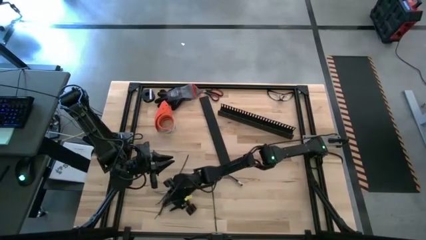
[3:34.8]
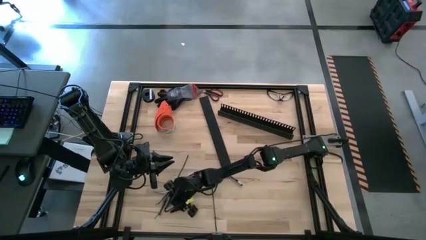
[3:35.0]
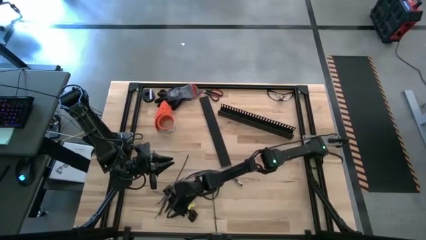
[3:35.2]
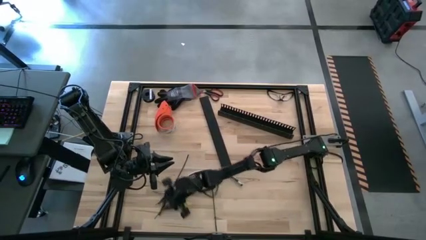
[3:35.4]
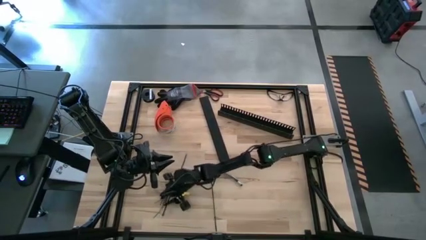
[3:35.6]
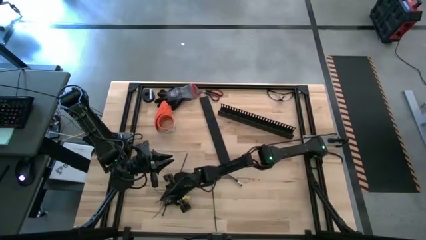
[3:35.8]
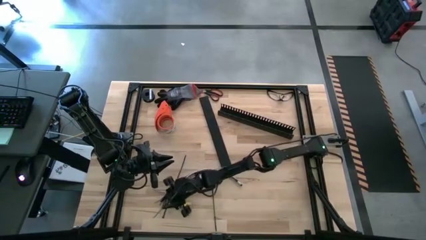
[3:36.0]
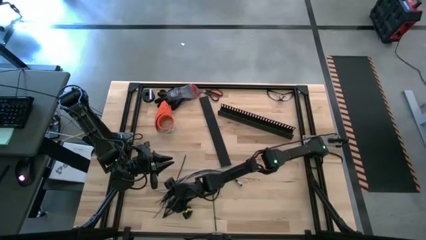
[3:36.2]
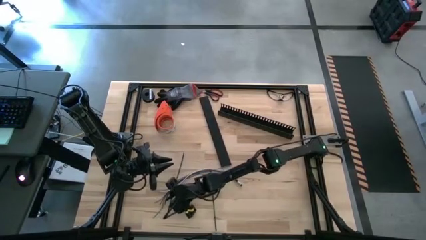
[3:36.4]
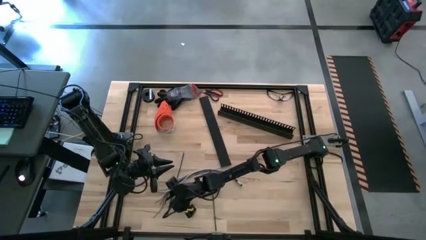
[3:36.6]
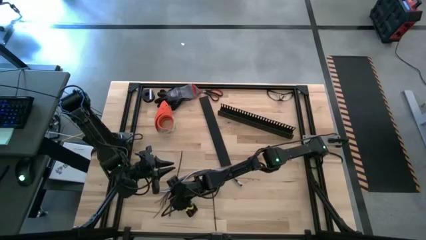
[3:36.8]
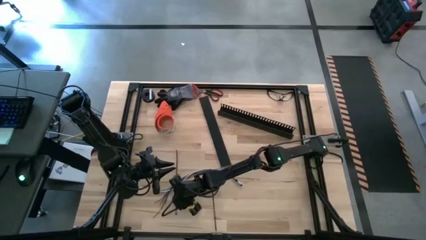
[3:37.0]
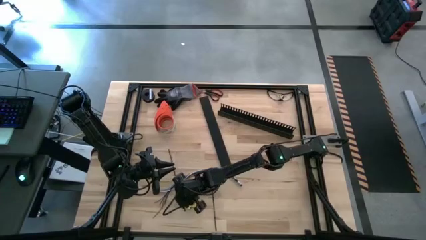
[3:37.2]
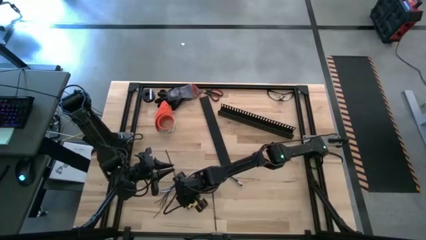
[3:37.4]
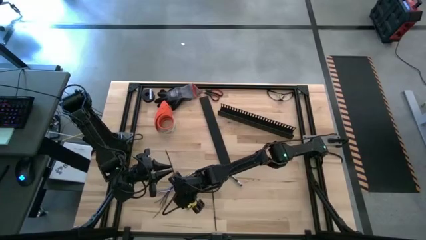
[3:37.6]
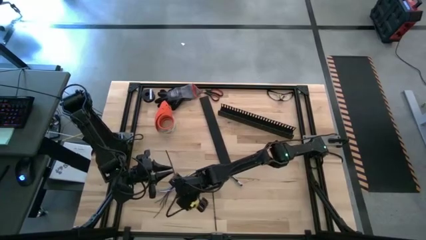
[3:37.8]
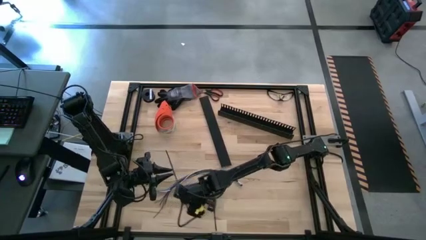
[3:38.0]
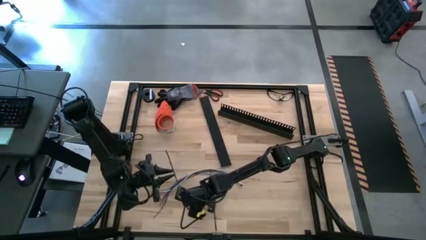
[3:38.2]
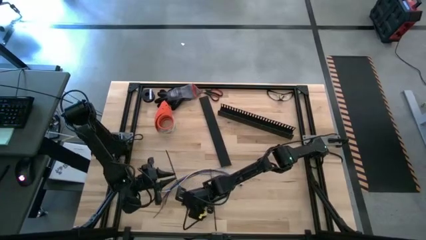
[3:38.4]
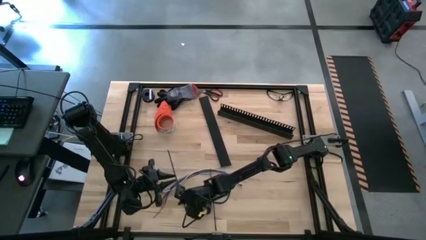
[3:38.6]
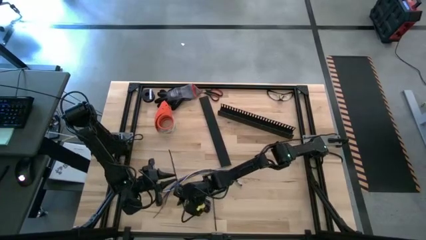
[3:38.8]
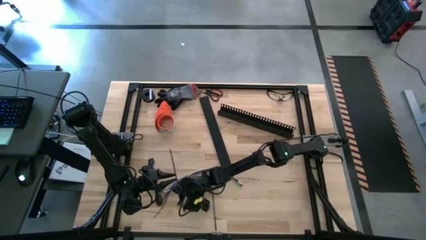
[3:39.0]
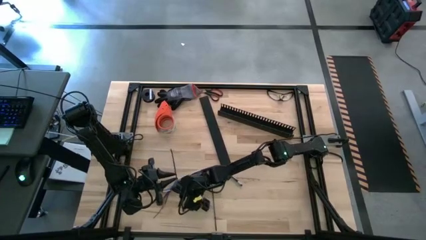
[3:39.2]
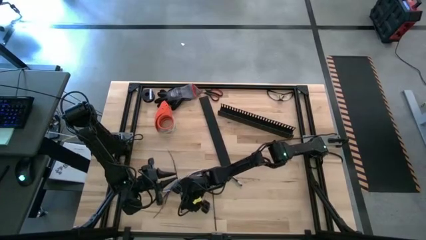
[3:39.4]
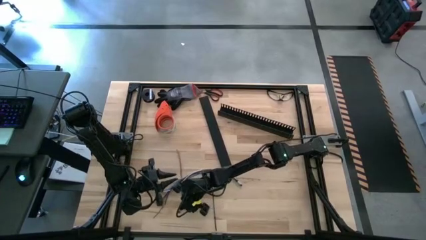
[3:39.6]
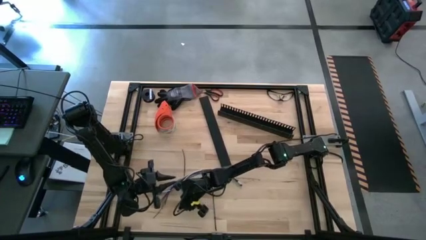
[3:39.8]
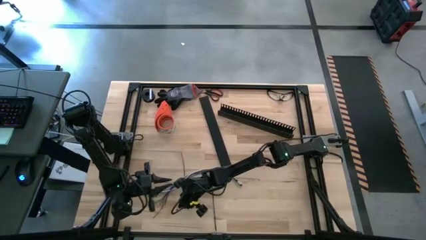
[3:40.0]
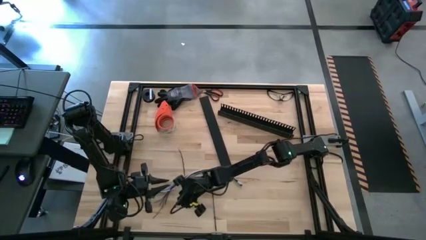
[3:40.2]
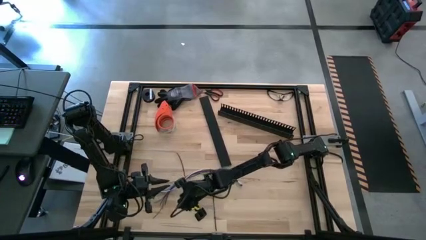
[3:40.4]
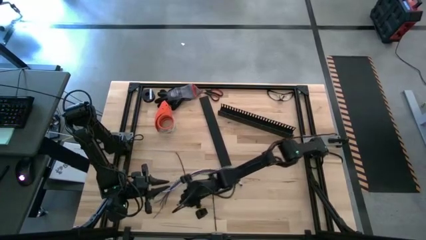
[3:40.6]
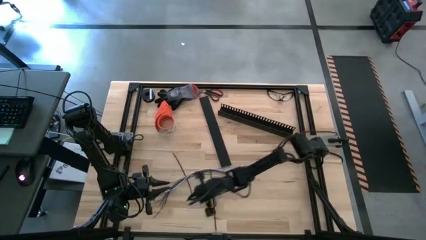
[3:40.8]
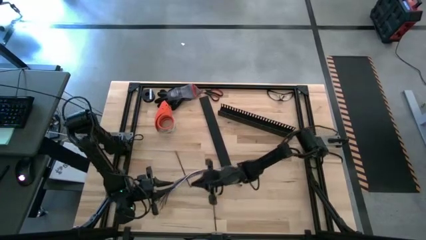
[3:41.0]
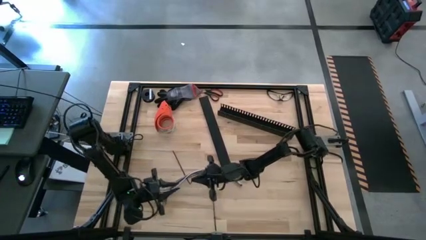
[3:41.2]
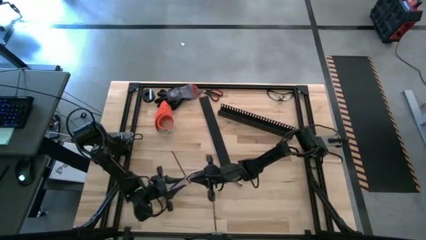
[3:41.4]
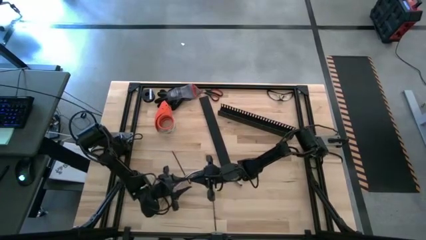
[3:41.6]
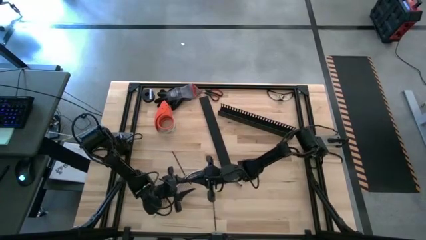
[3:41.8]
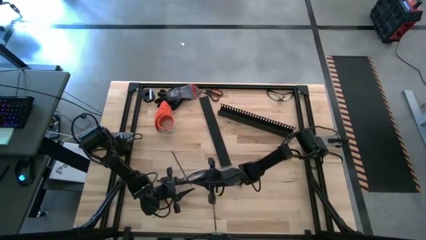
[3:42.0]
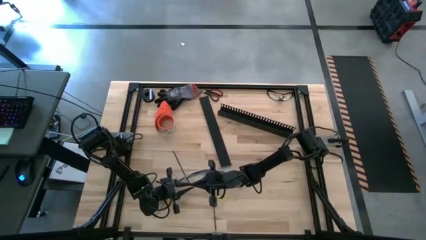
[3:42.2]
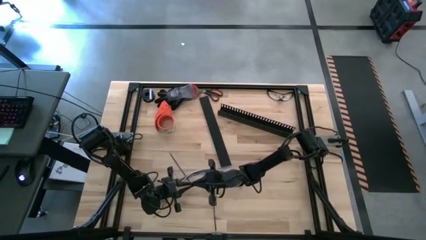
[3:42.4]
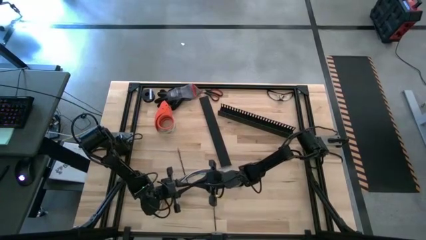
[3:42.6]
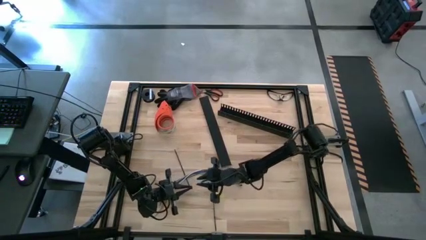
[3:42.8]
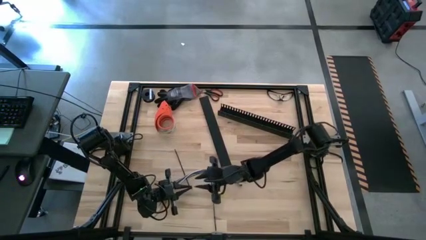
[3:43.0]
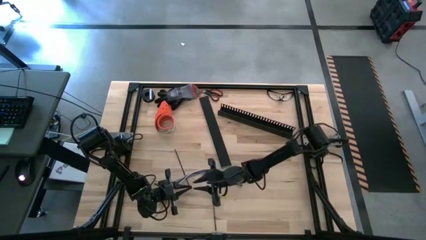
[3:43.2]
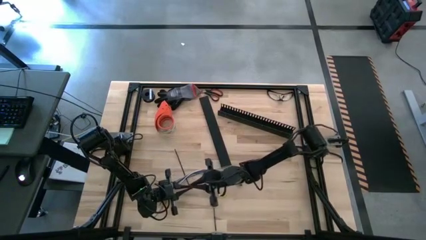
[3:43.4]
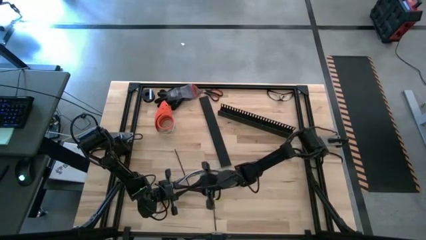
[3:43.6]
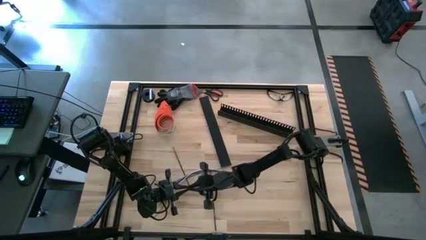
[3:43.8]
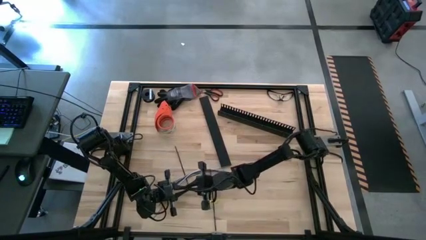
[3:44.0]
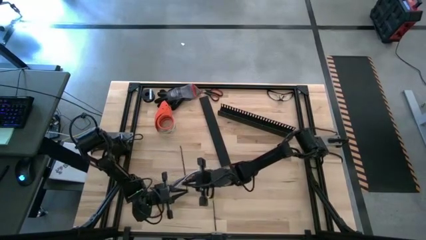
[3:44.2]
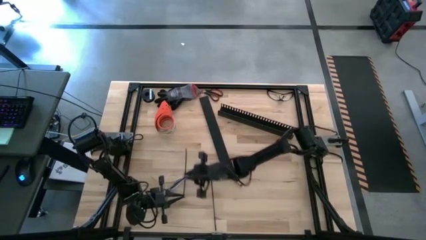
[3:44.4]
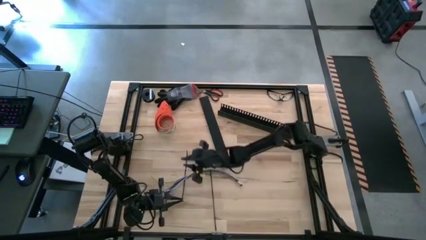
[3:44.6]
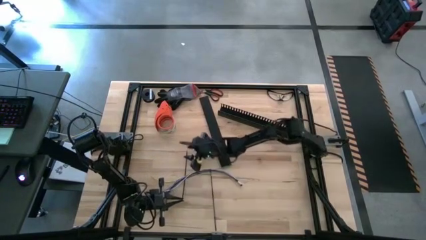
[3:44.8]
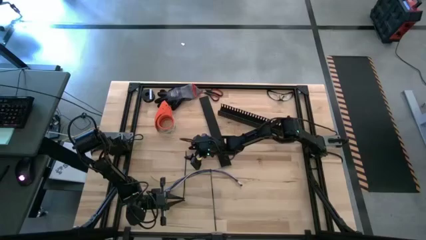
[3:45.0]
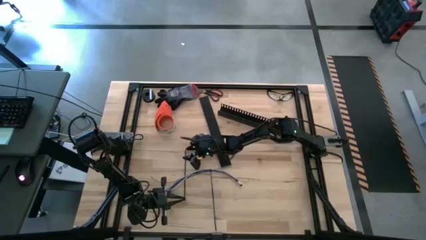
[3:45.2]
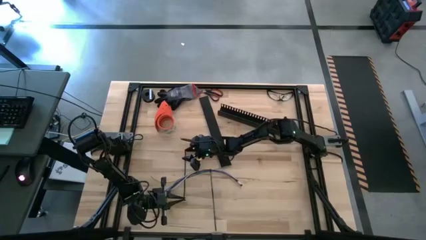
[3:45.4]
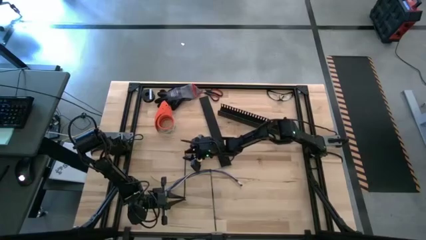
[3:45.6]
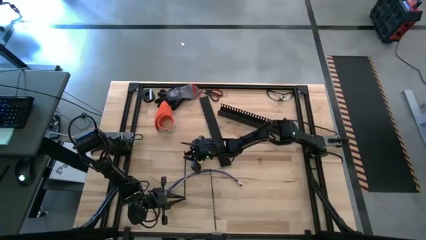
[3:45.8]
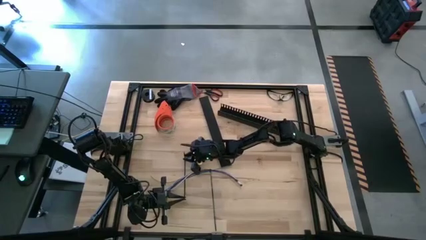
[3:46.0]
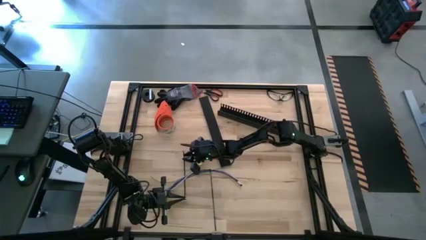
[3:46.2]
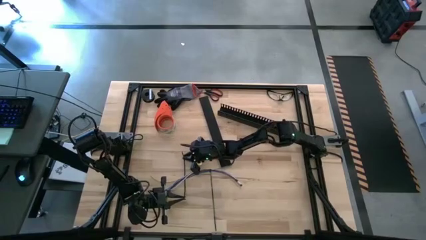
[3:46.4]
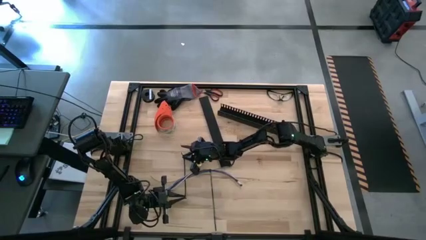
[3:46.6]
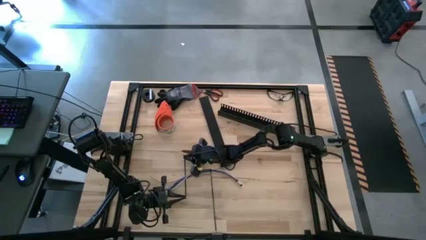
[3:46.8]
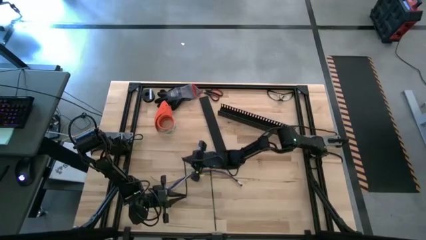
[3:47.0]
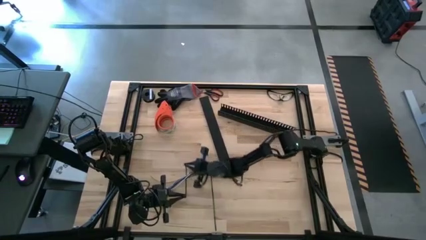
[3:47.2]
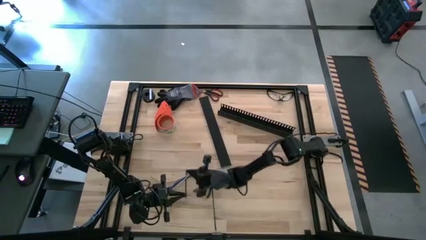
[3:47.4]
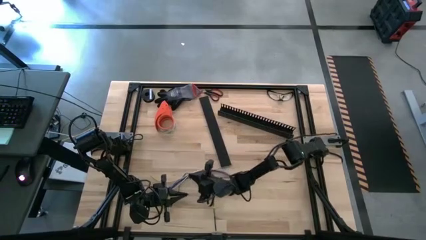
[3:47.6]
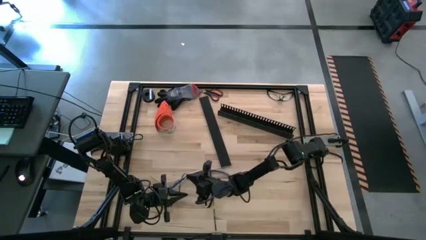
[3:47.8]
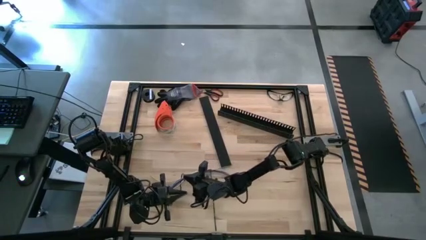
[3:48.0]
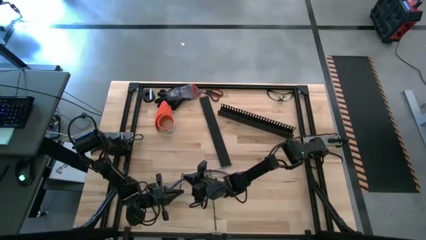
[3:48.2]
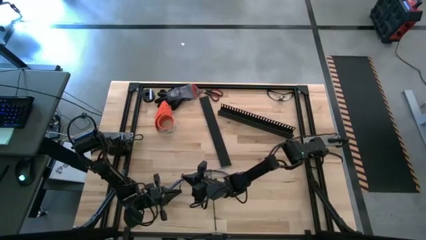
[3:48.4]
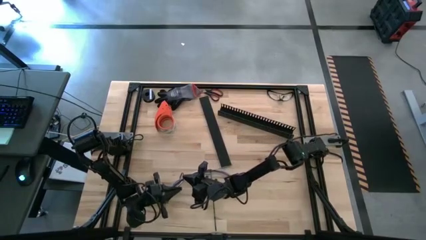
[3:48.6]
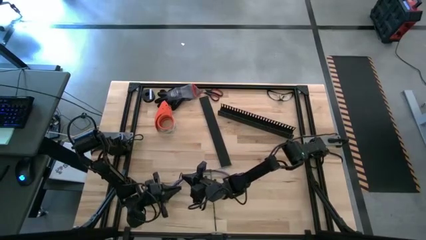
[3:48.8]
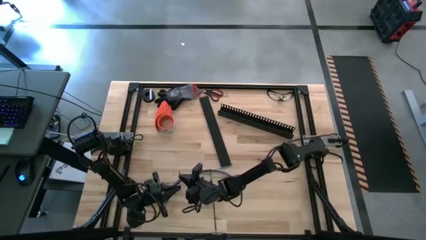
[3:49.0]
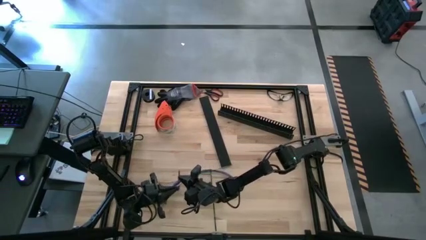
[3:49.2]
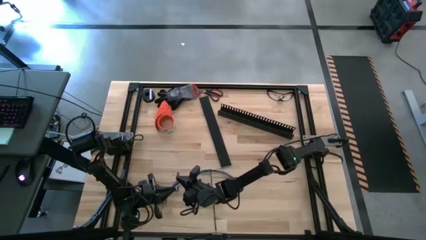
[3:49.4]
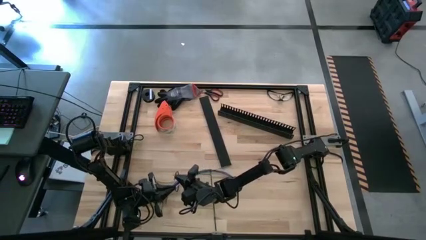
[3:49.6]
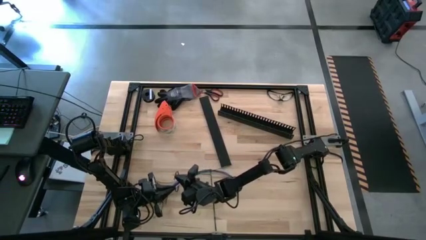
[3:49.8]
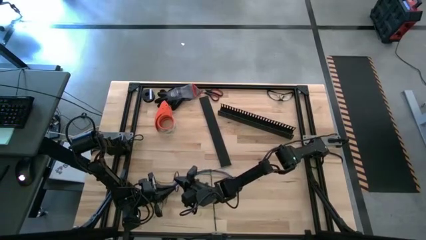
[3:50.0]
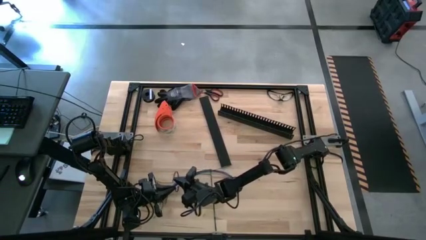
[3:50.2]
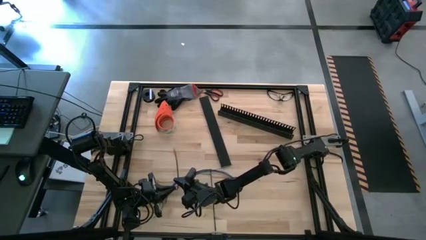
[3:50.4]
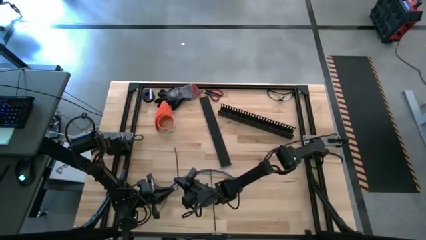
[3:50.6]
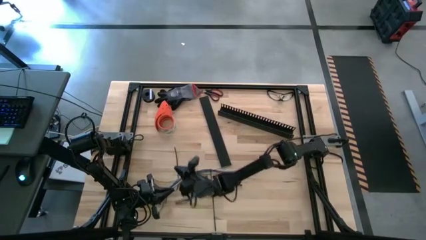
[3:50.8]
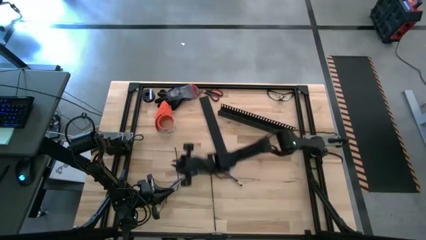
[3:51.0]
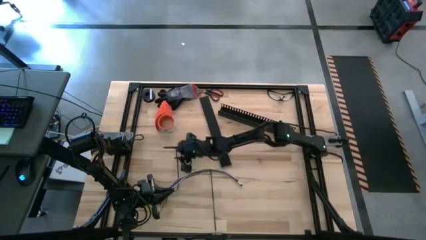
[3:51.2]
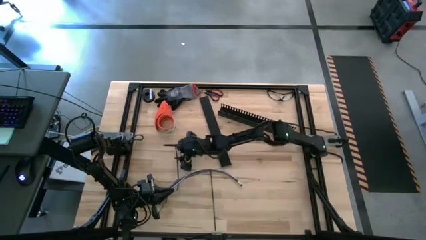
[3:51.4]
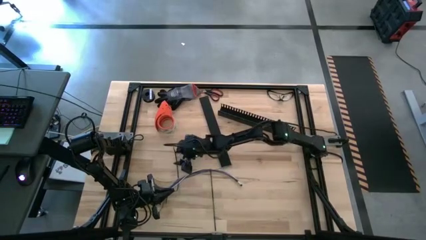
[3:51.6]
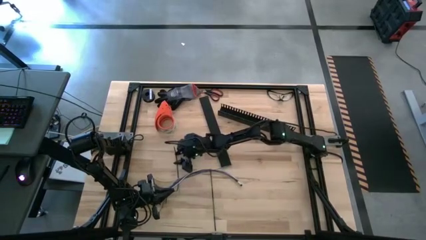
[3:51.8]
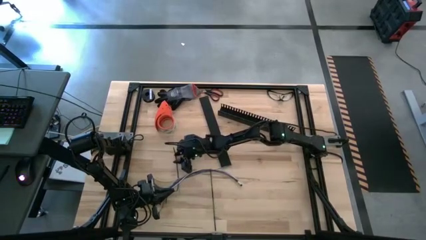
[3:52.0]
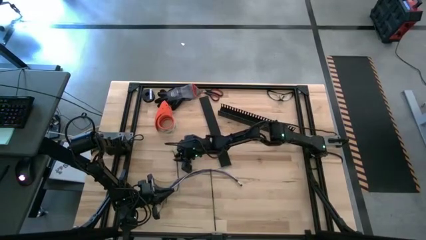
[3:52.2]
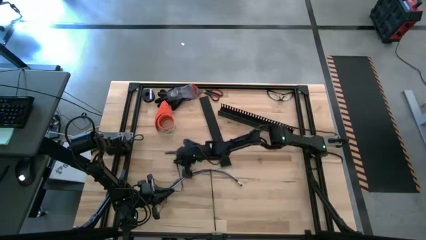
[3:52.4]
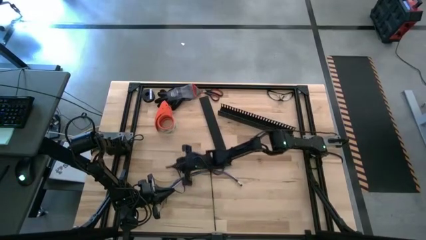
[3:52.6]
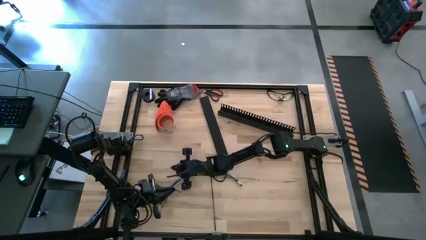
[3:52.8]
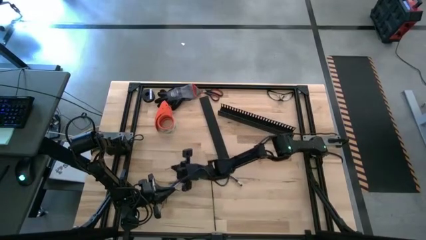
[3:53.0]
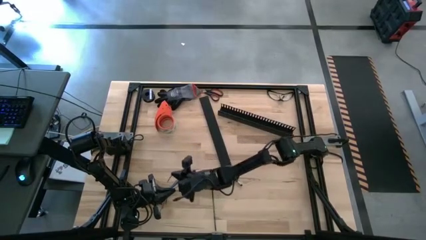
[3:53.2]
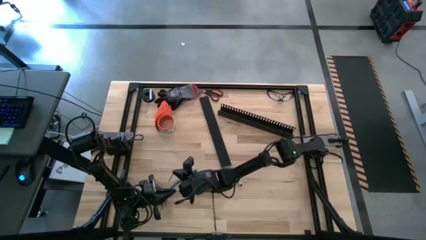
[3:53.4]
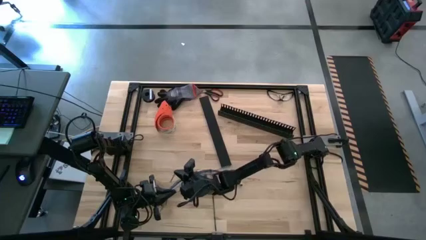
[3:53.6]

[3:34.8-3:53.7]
Task: Ziptie cables
Wrap the black zip tie on the cables
